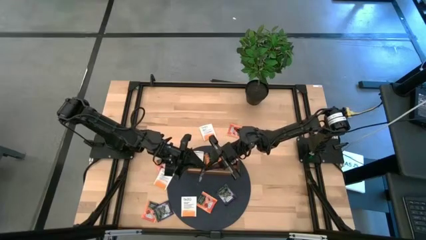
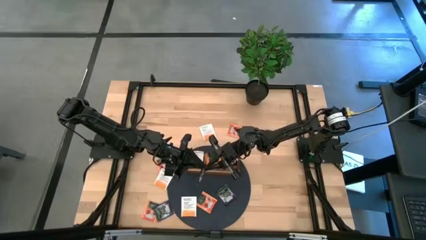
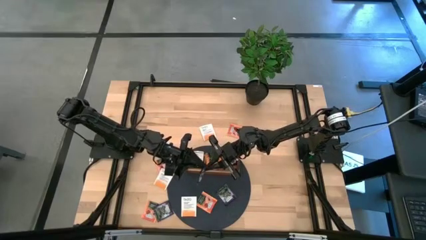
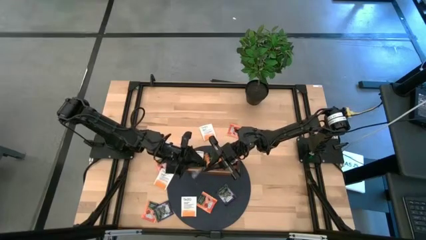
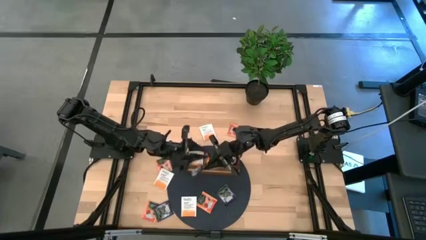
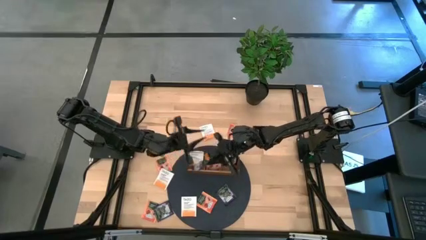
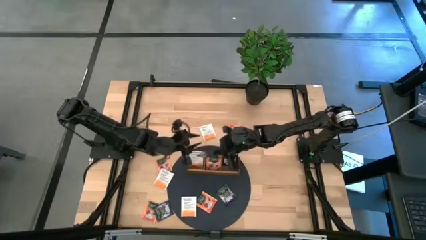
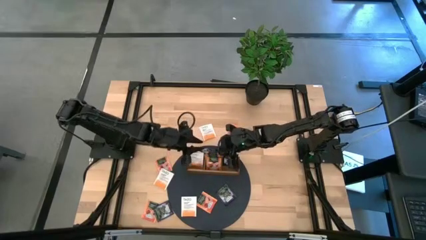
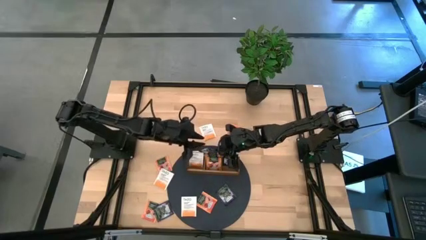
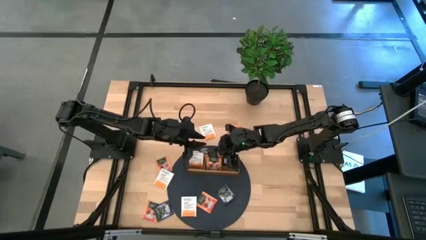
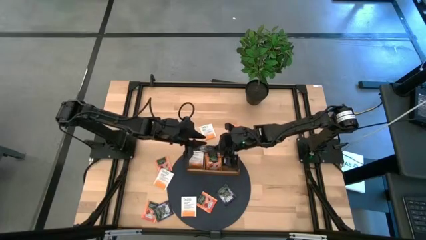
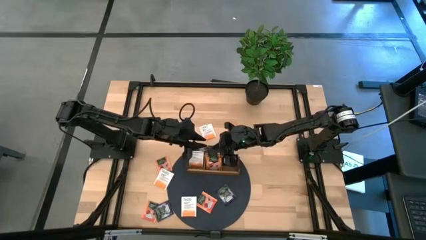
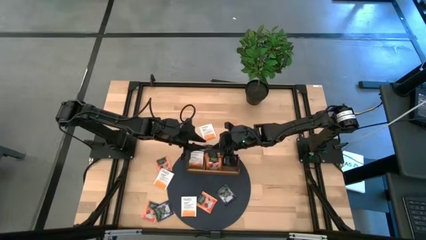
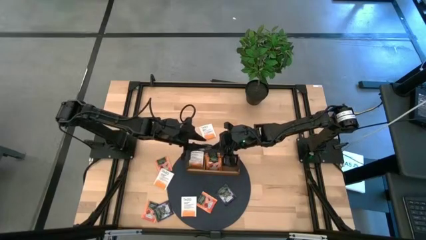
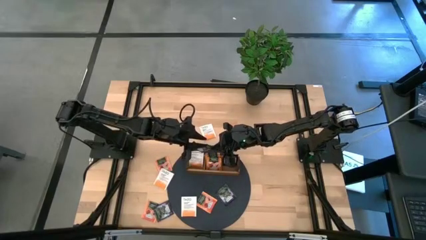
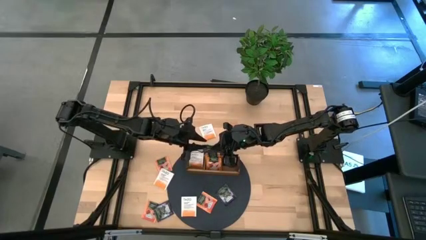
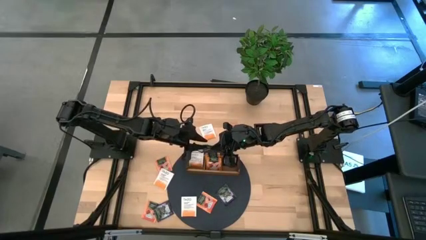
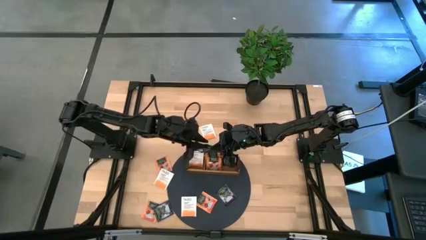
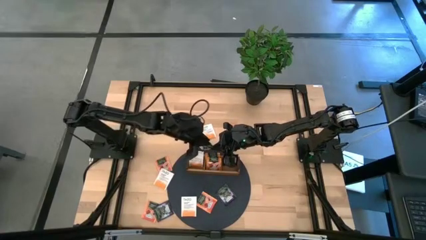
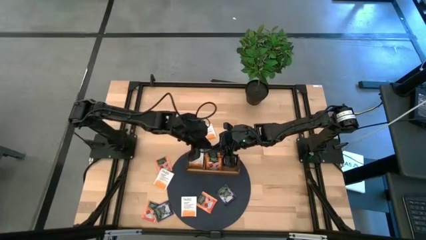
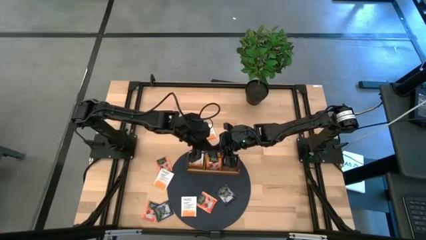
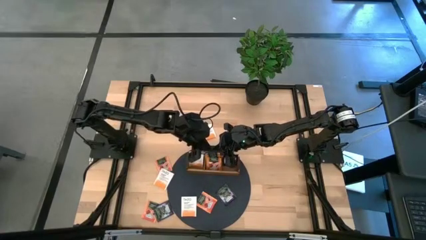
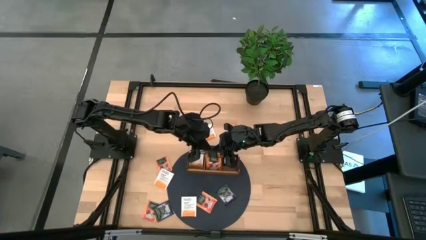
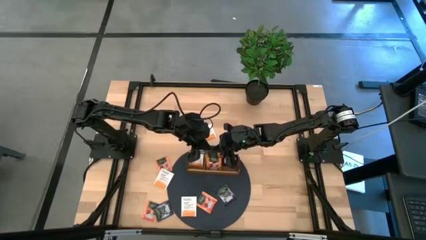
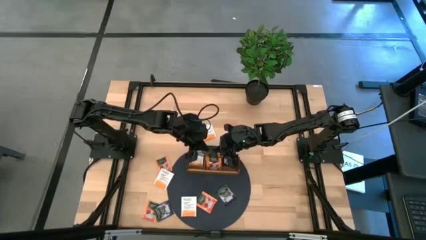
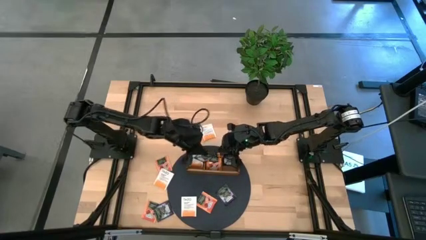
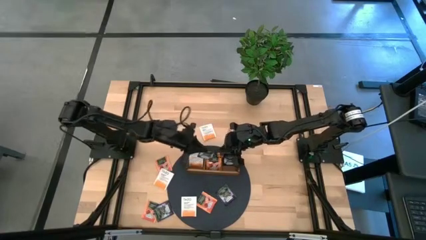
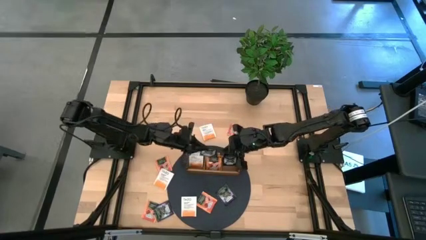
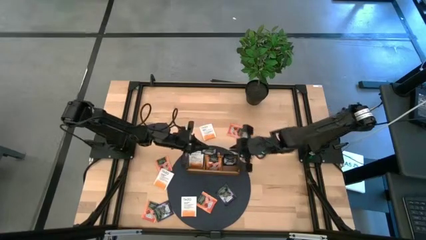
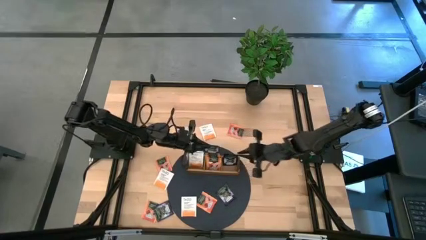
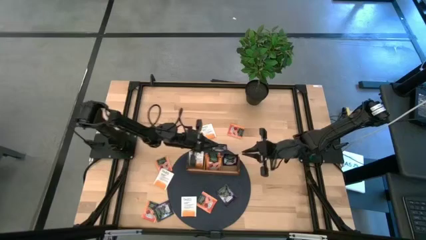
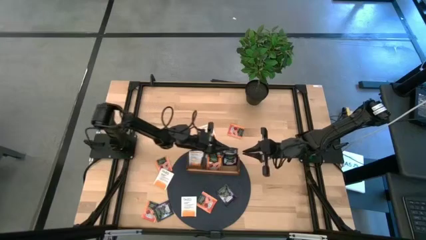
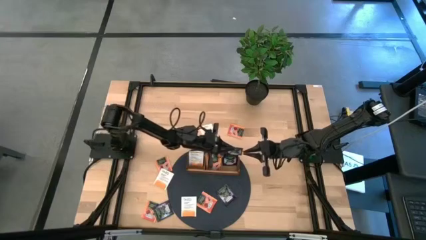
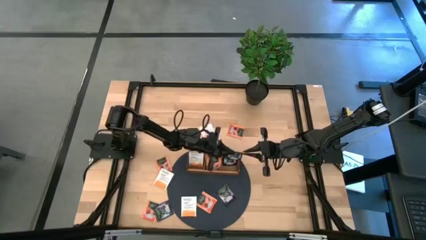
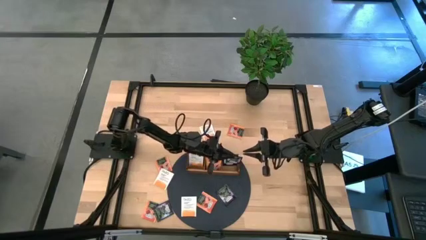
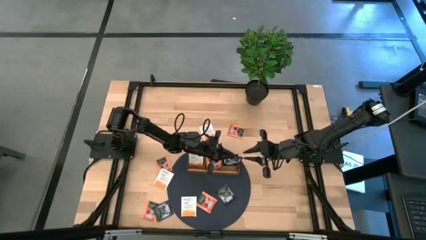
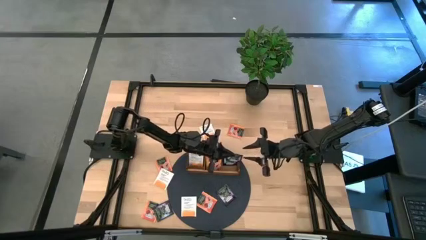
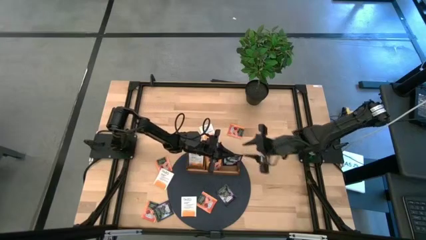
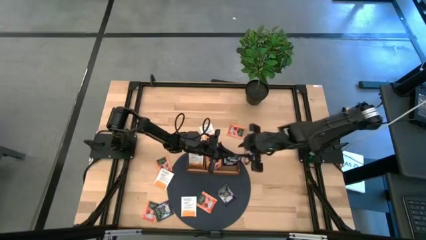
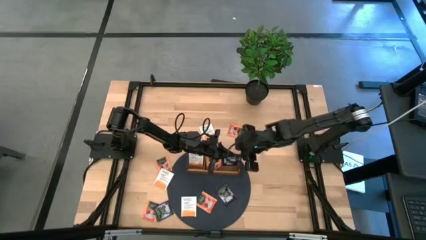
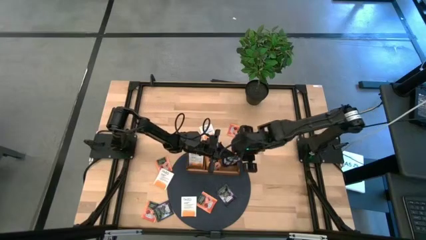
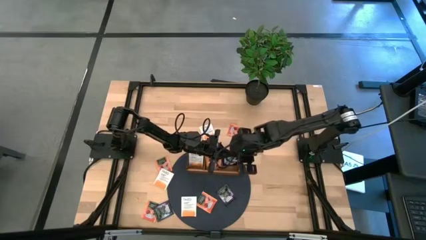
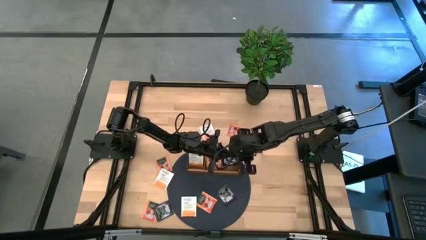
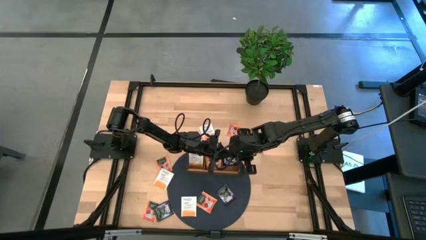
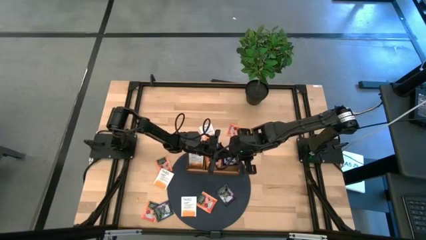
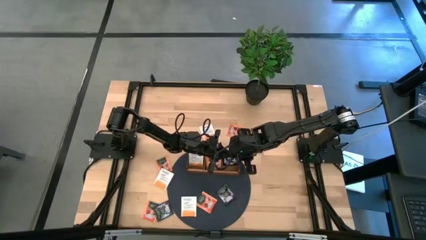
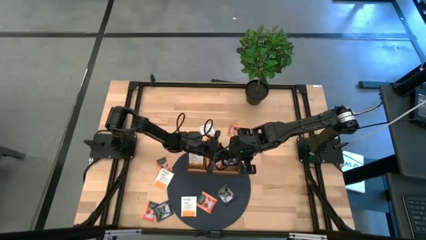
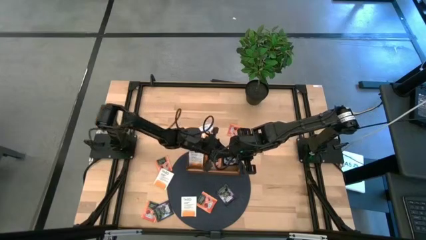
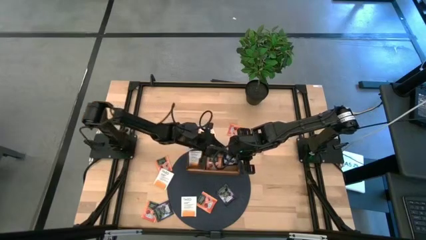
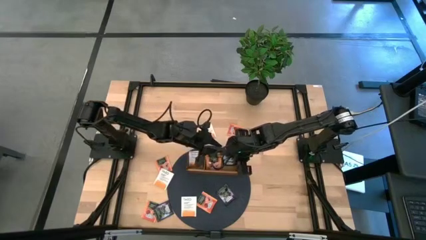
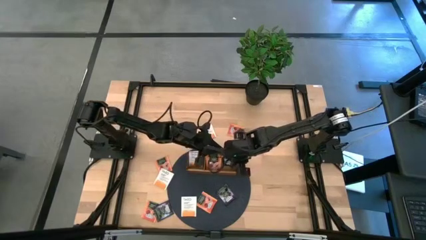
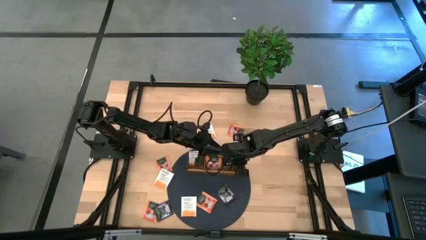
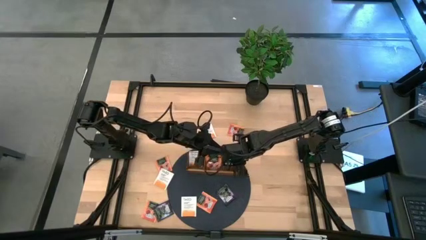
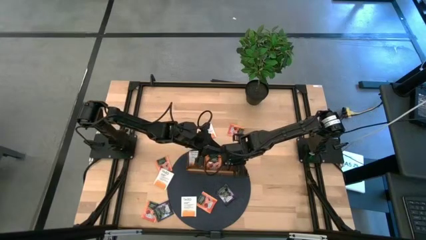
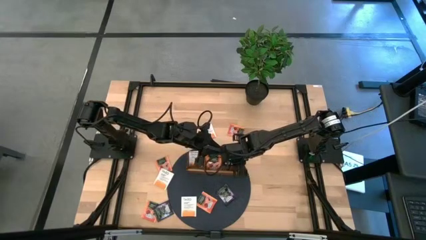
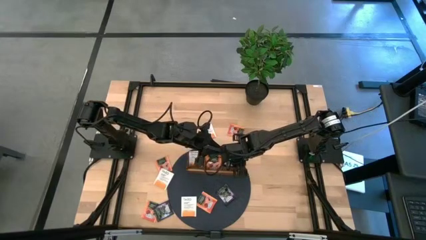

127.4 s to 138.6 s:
Task: Pick & Place Tea
Put the black white tea bag into the right section of the wooden organizer

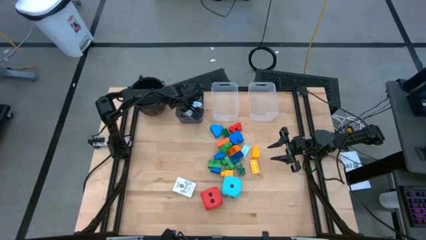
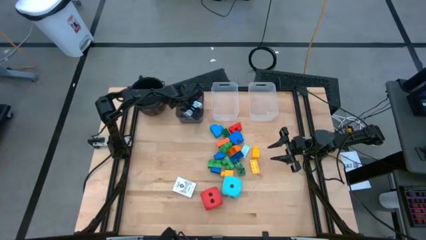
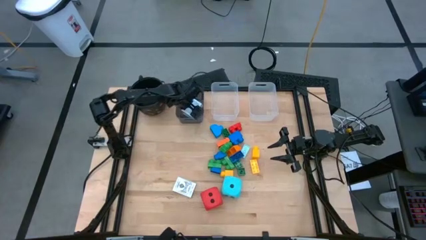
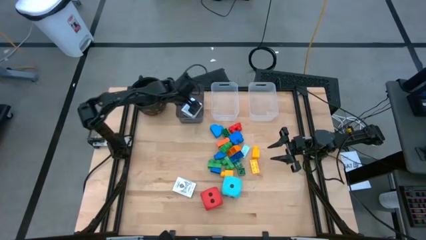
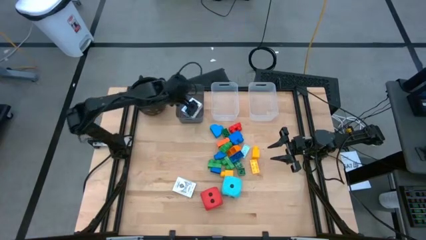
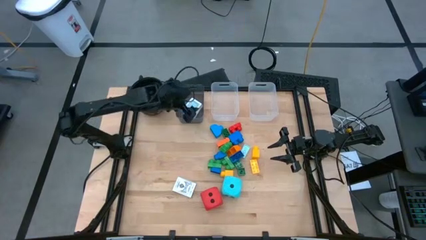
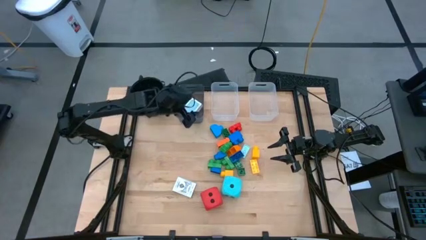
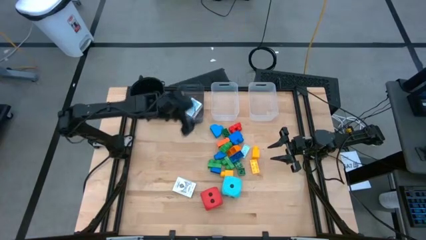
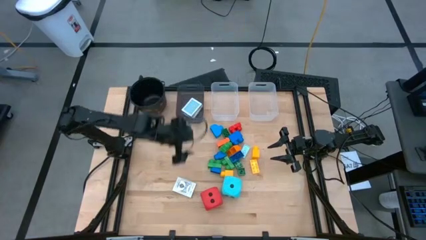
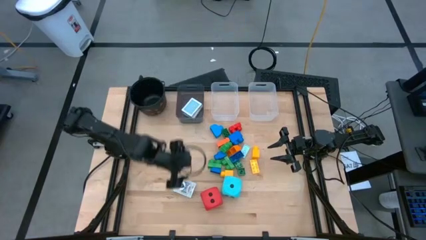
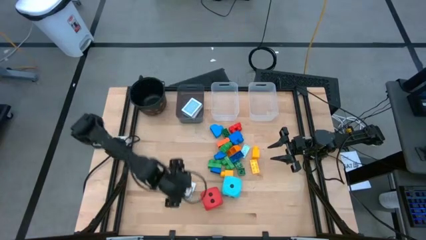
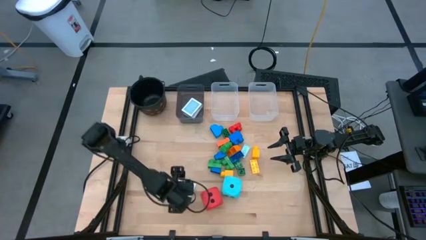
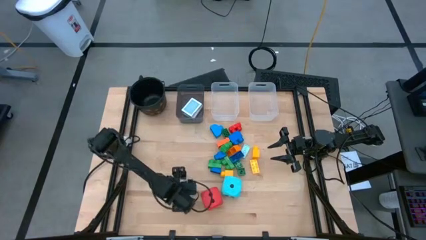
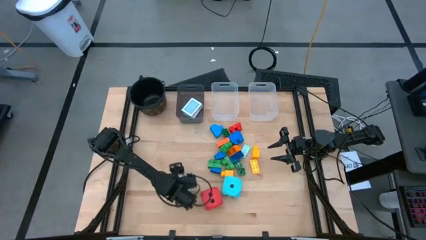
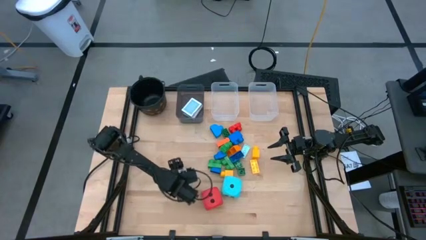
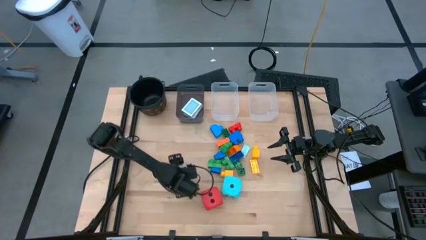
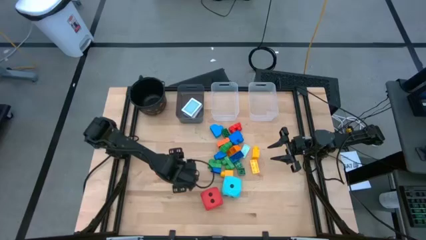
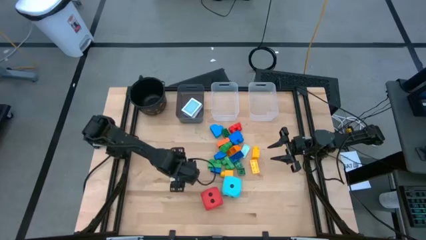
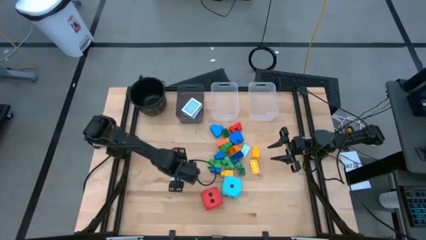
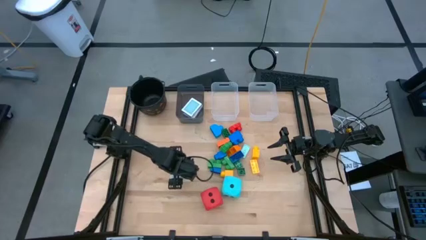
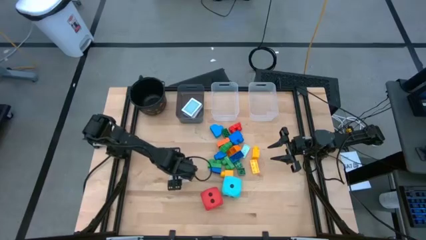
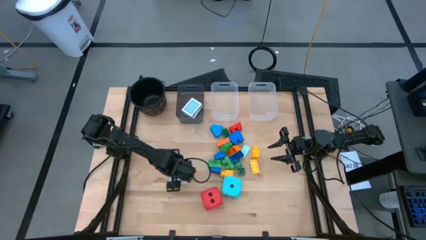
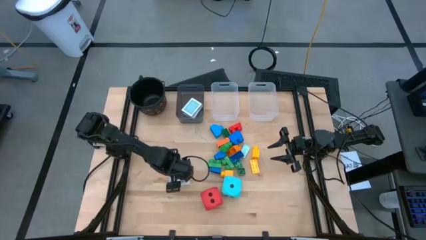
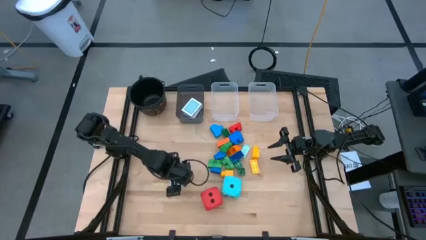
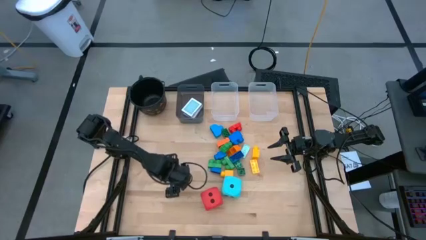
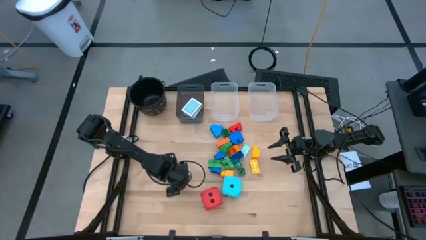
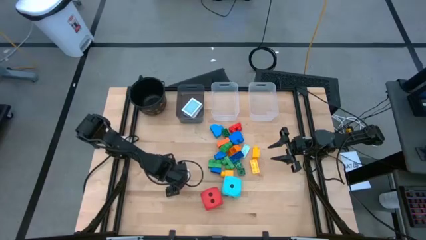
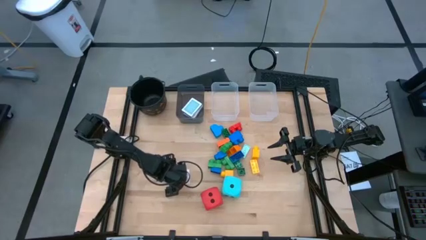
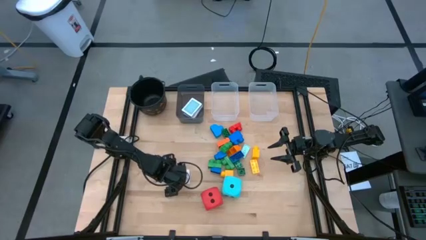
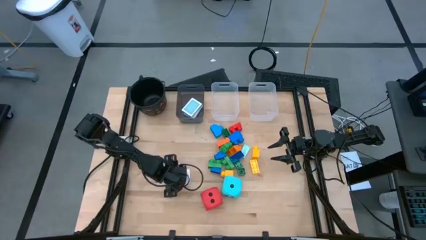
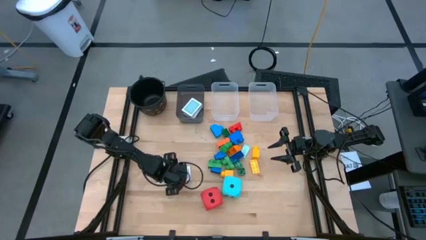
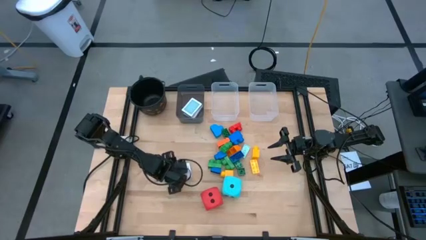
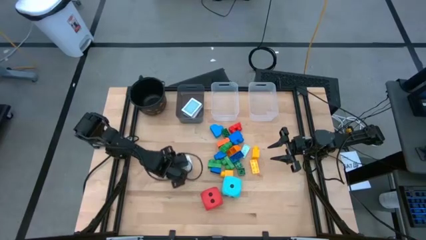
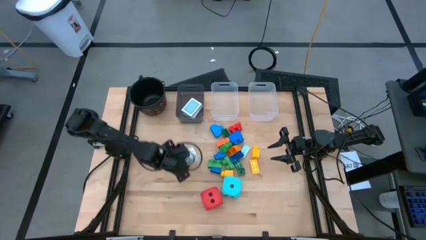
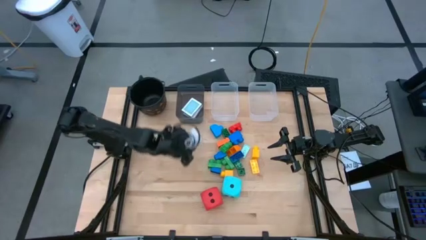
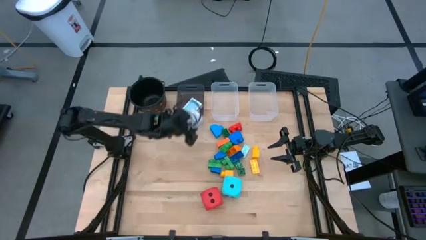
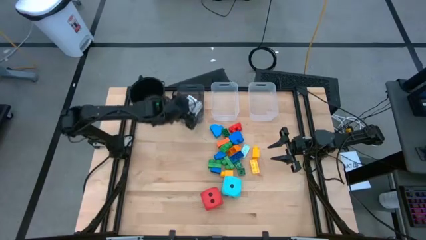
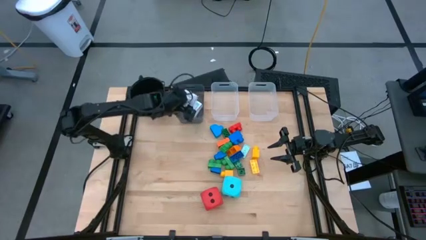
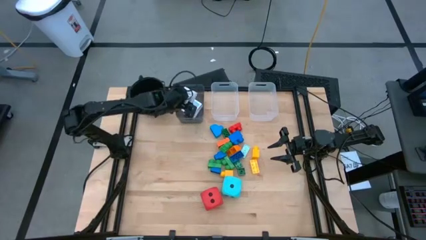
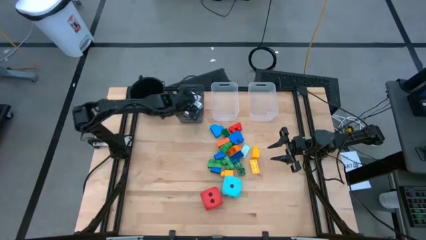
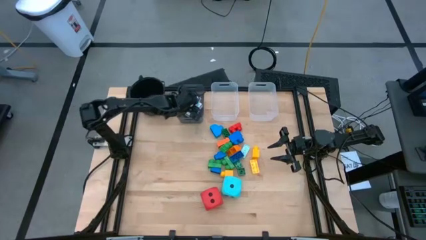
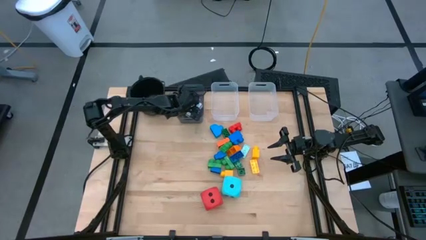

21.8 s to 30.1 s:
Task: Pick & Place Toys
Put the playing card box into the black bin
